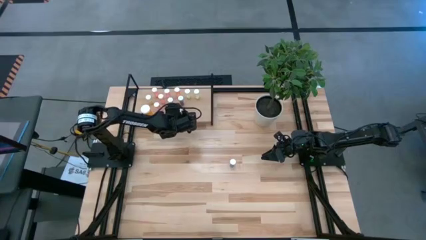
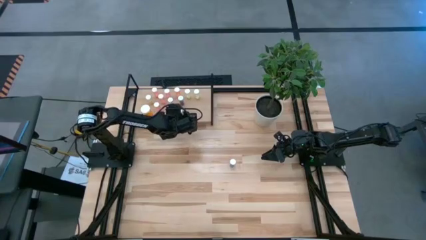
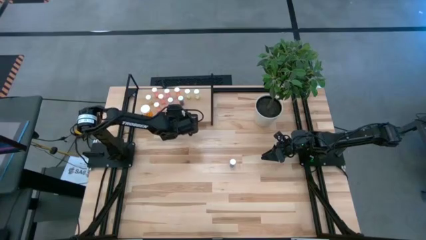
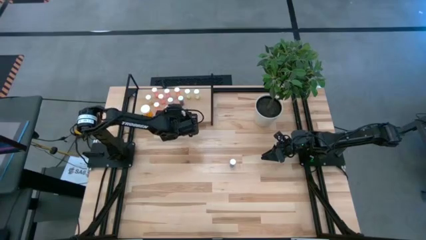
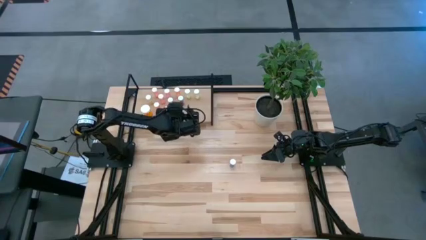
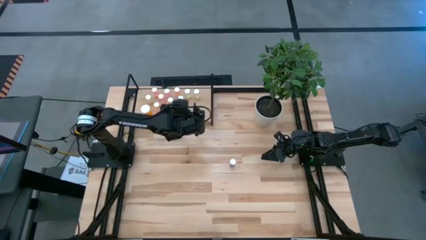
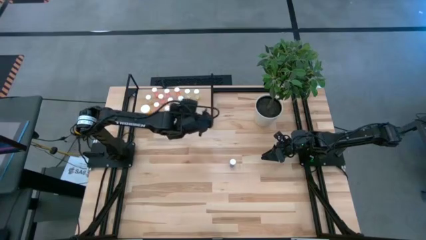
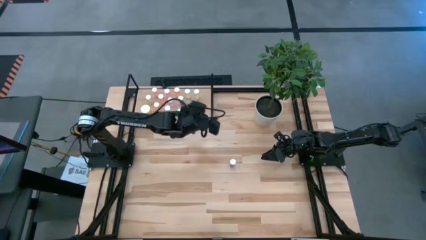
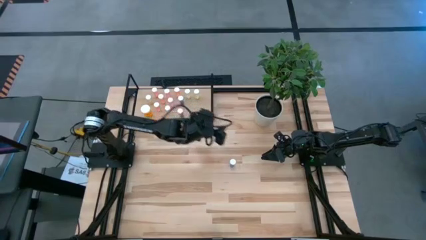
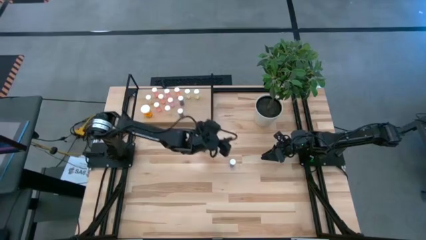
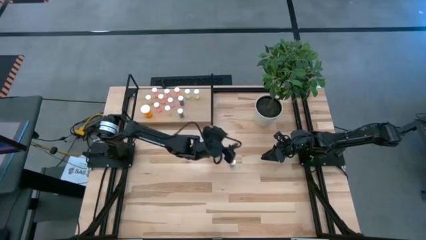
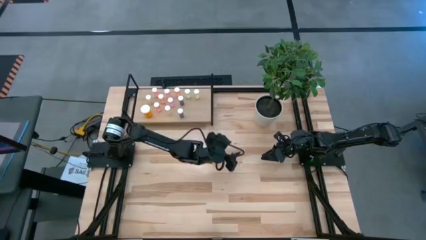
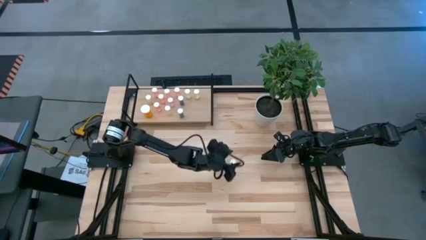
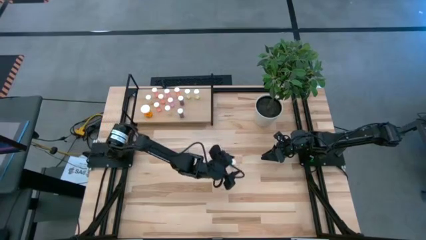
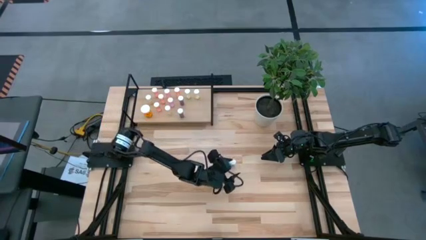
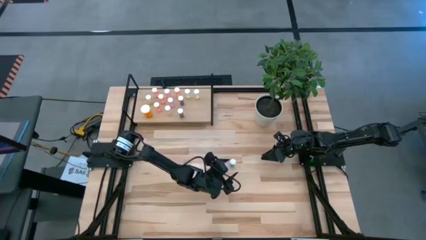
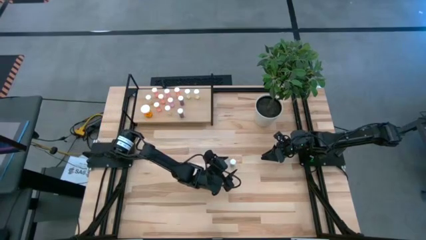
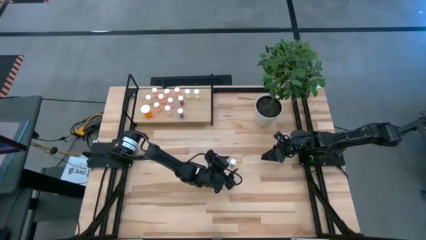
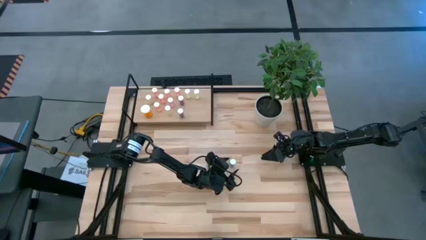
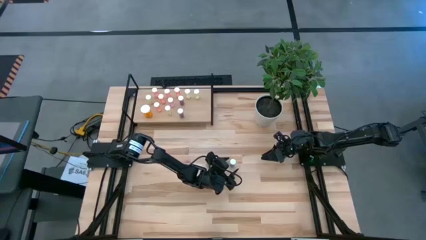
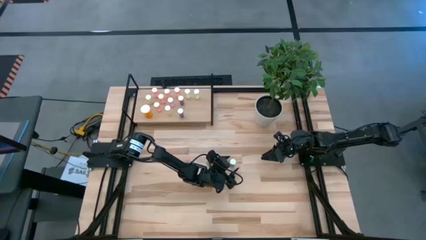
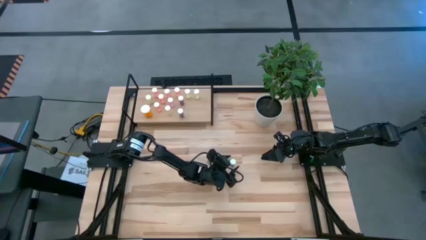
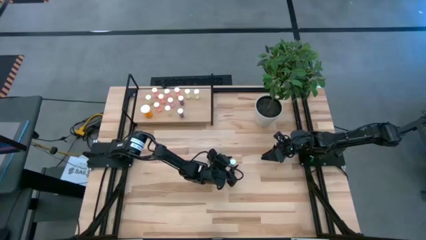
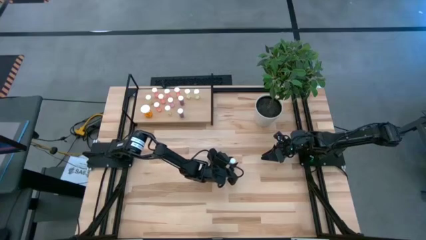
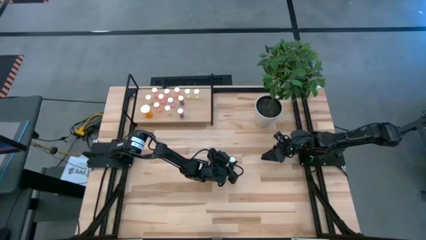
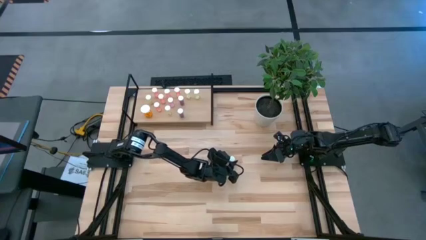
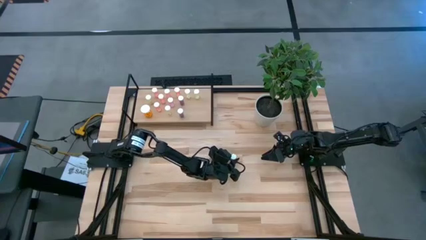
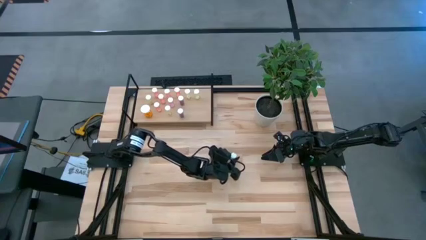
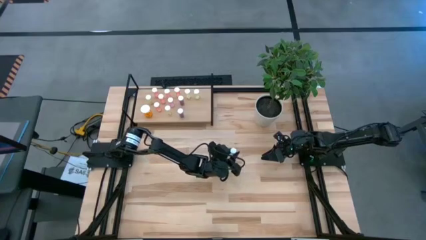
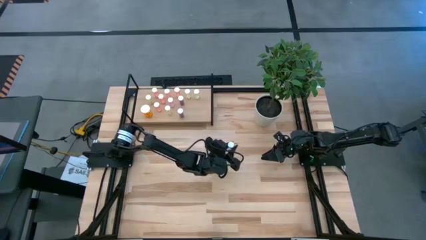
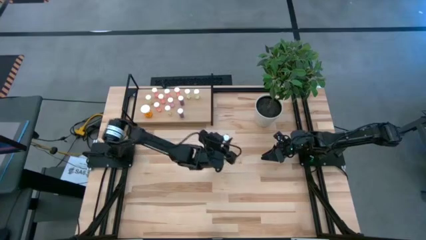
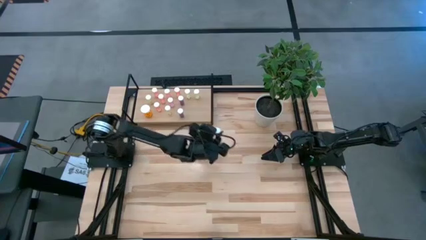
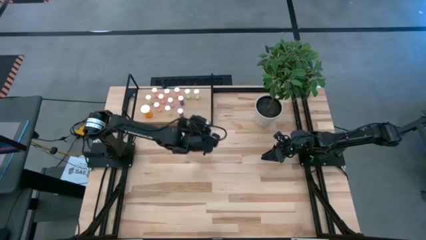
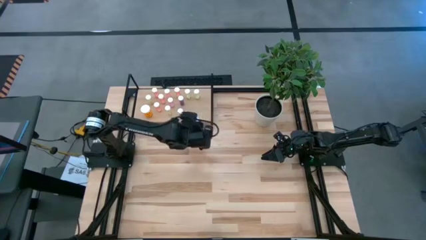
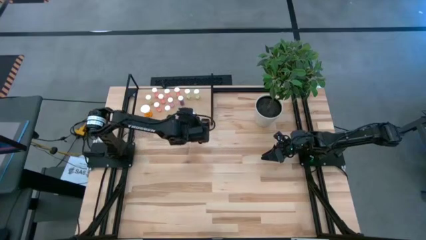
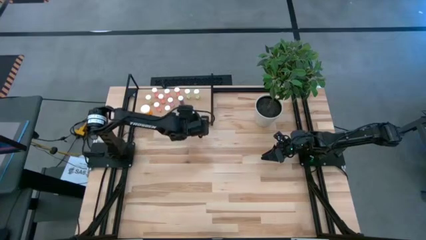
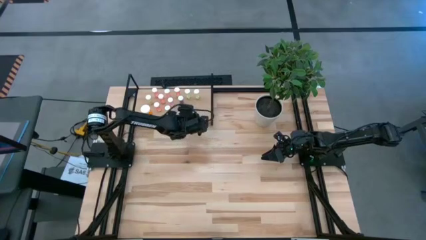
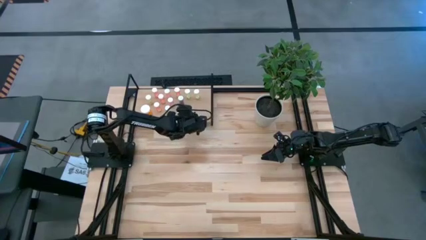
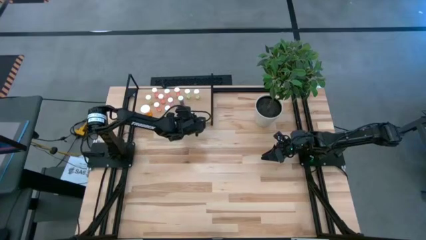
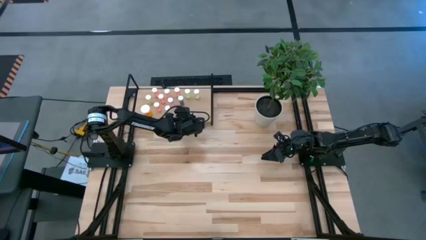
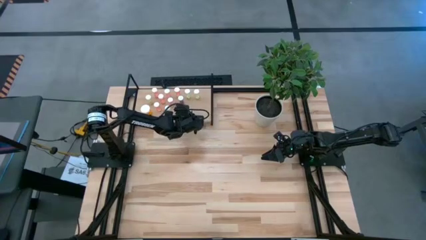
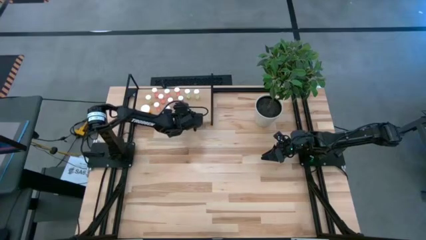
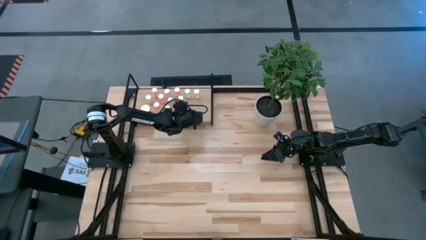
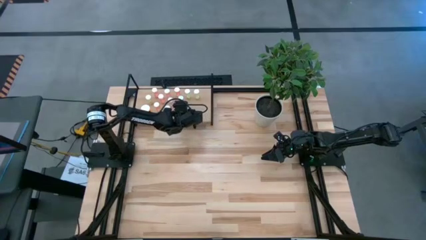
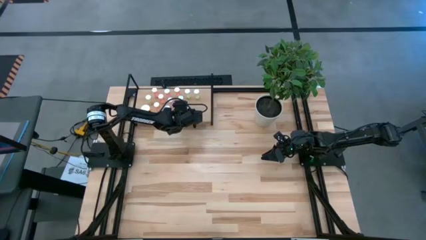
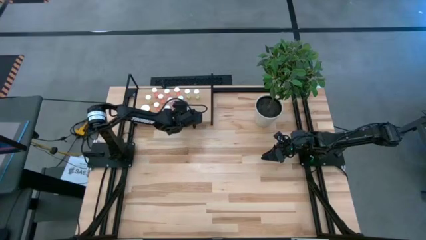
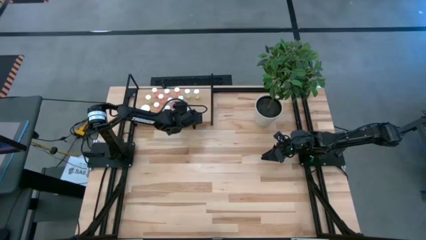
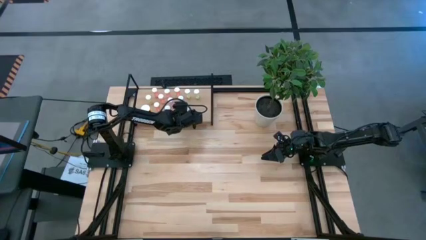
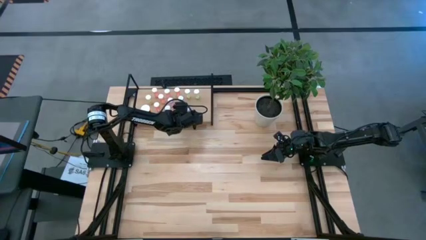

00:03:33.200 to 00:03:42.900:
Task: Pick and place medicine bottles onto shelf by color
Put the blue pill bottle on the shelf
